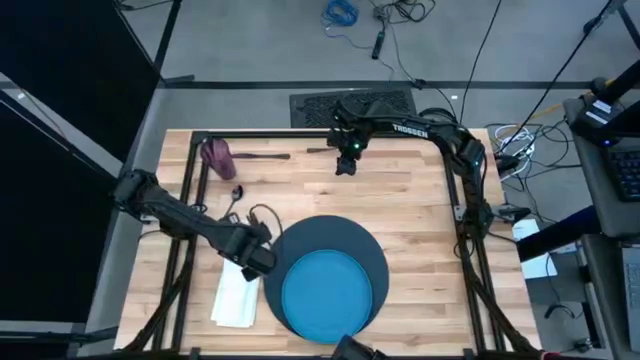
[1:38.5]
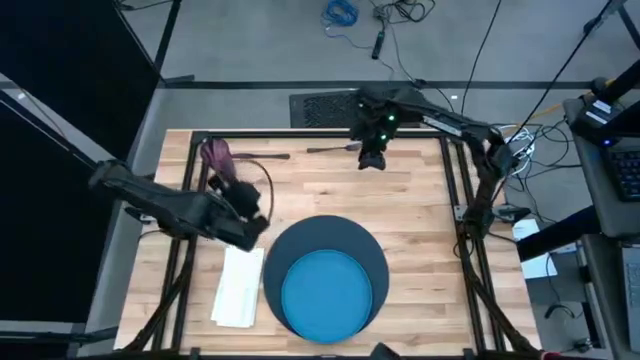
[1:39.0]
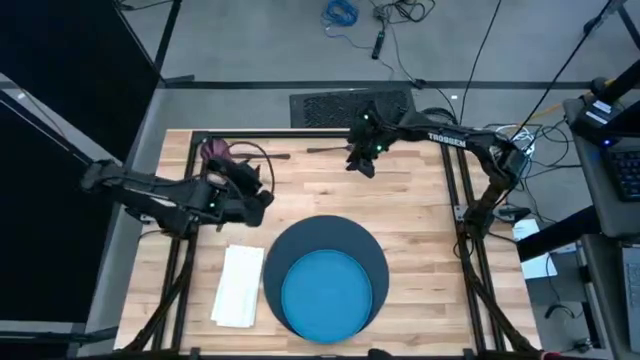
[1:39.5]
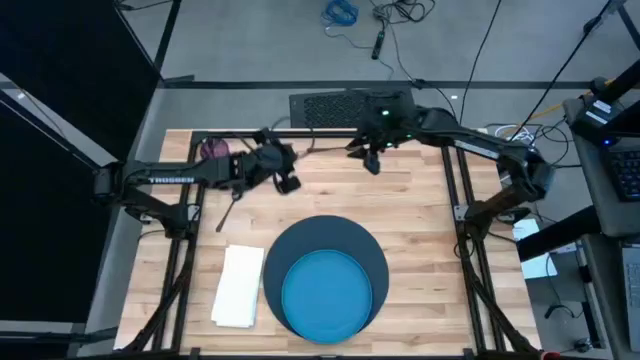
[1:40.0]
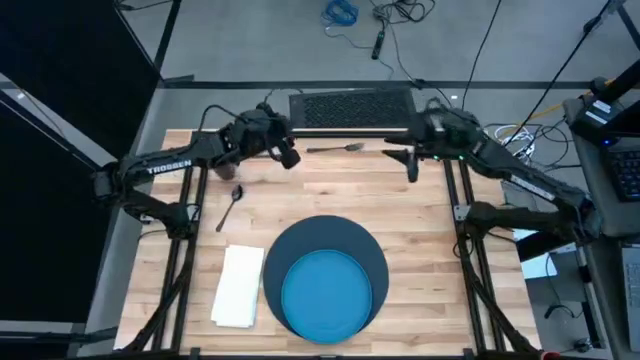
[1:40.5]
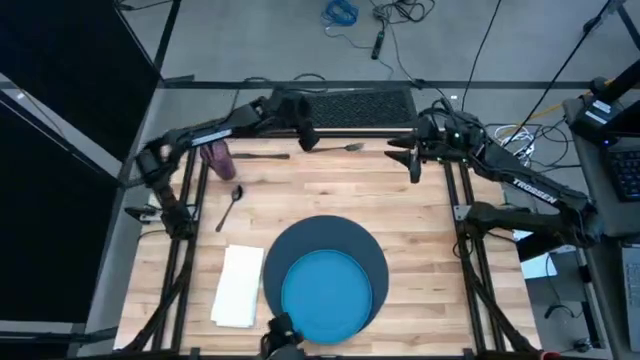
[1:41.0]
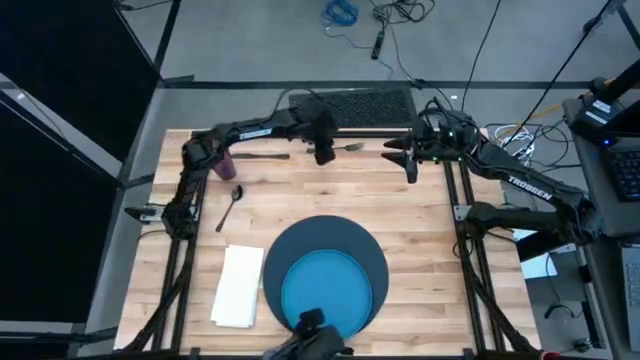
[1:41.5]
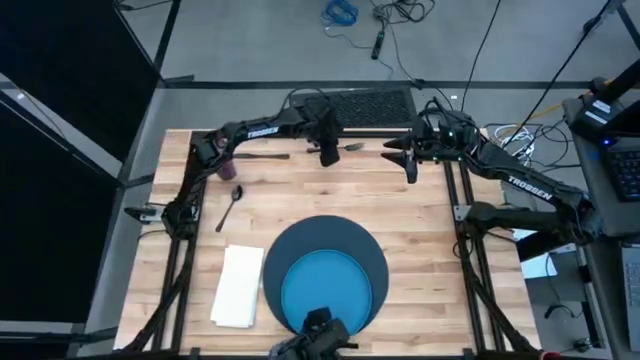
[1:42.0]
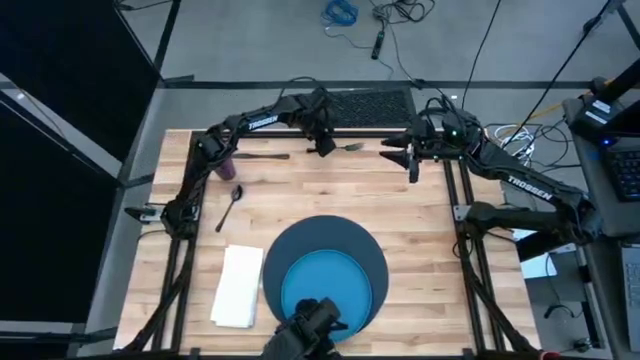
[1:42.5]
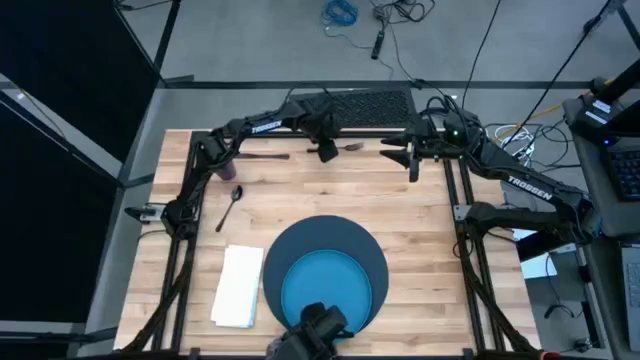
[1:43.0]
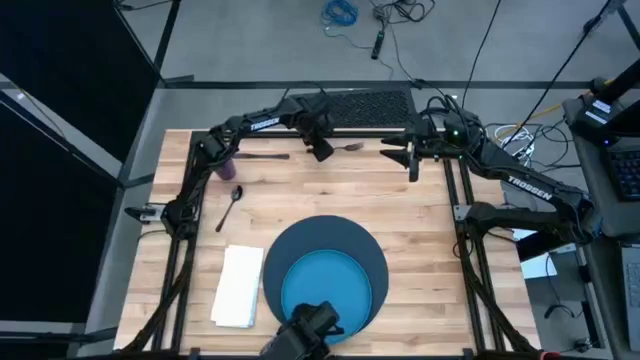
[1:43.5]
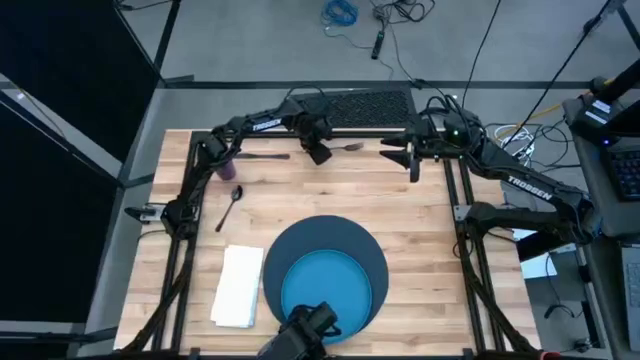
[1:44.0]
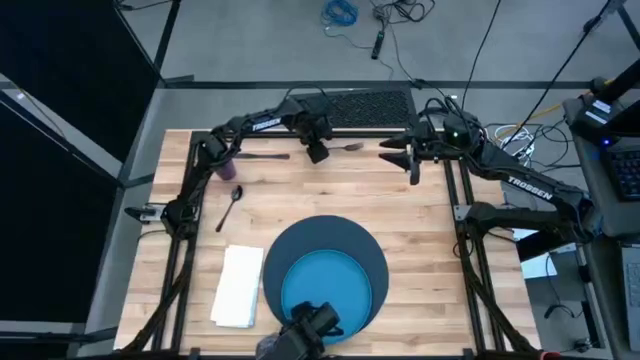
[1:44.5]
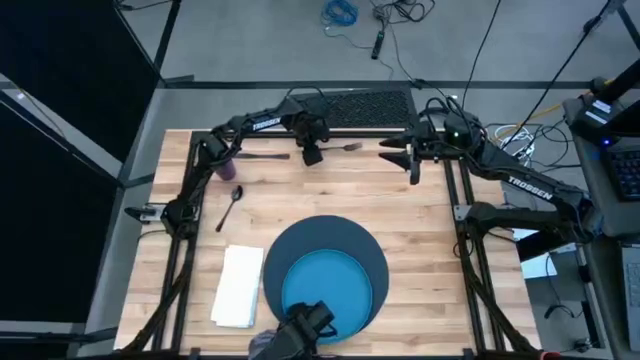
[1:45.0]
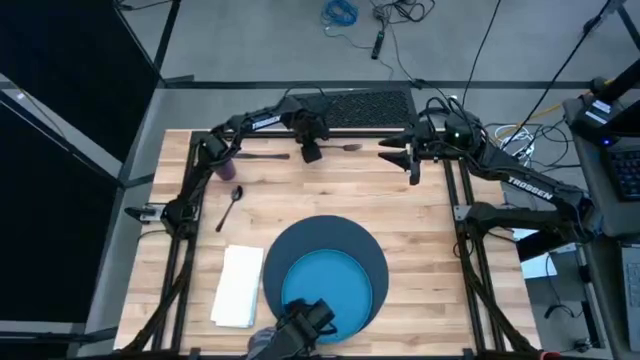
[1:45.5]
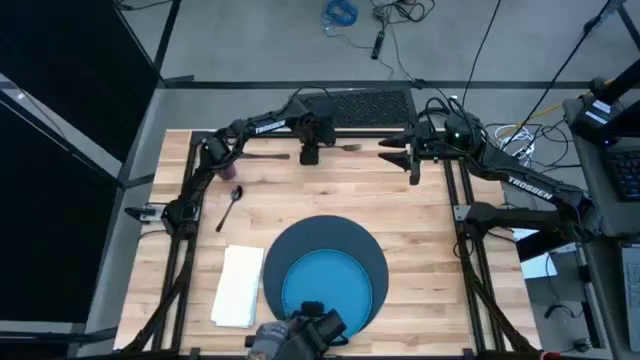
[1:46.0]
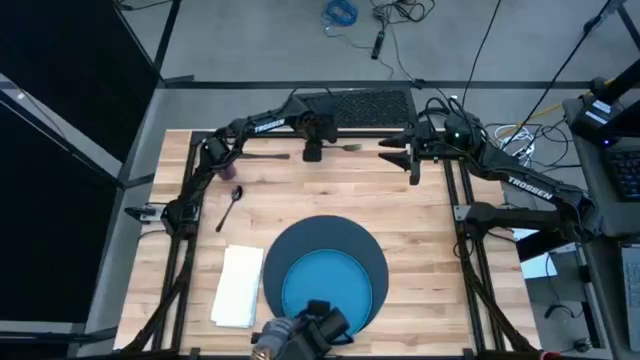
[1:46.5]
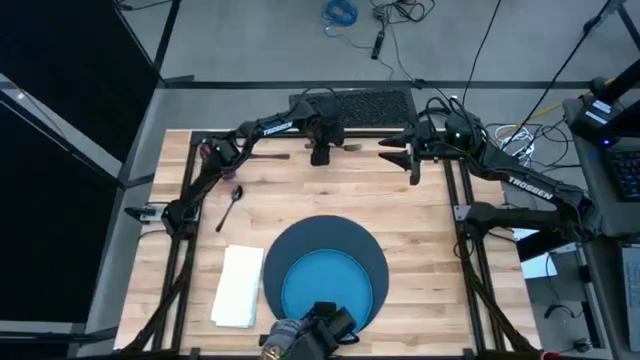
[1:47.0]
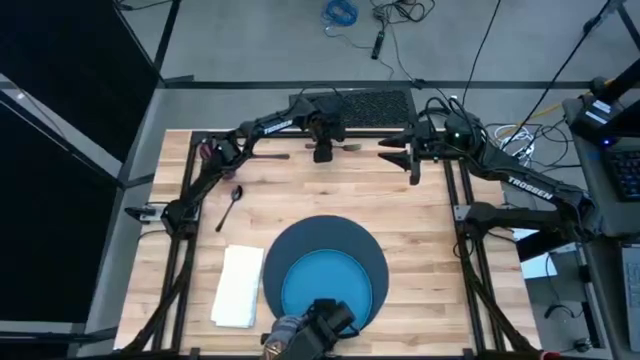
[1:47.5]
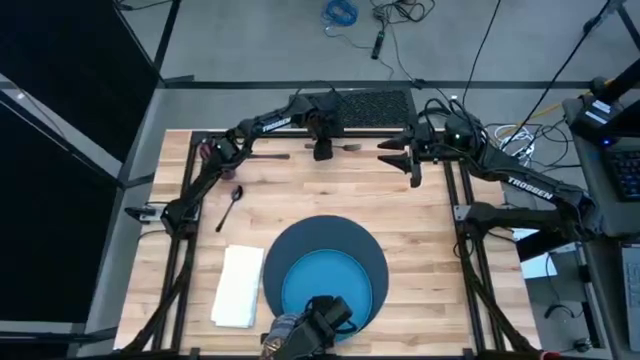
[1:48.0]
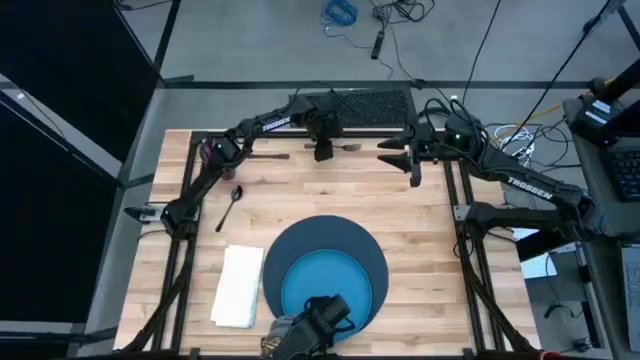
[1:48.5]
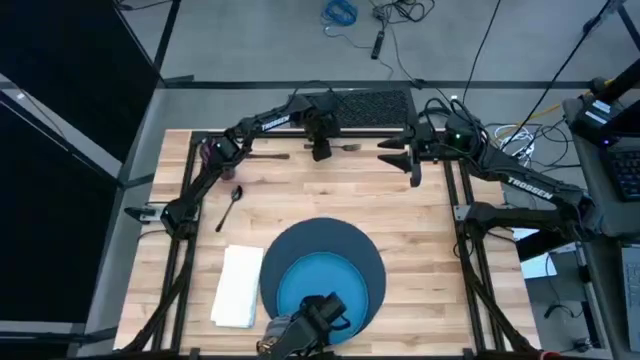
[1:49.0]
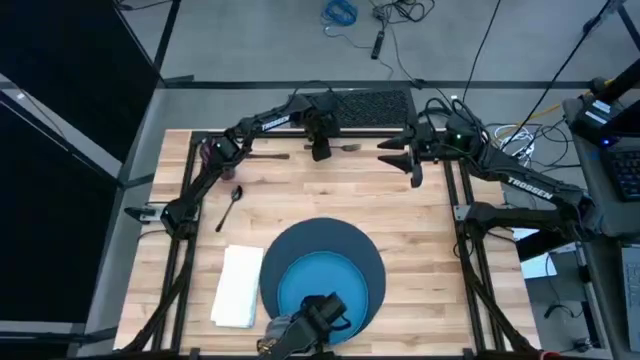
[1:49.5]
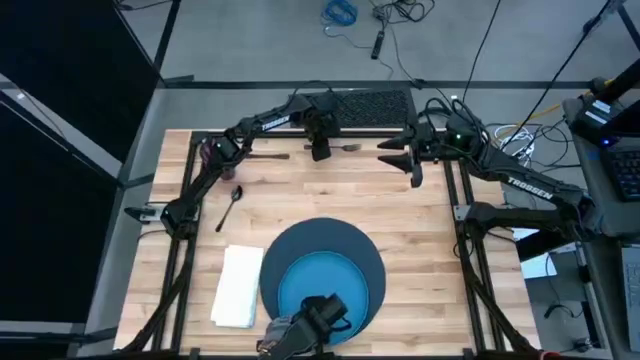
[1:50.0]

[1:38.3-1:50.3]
Task: Set table place
Put the fork on the white table napkin

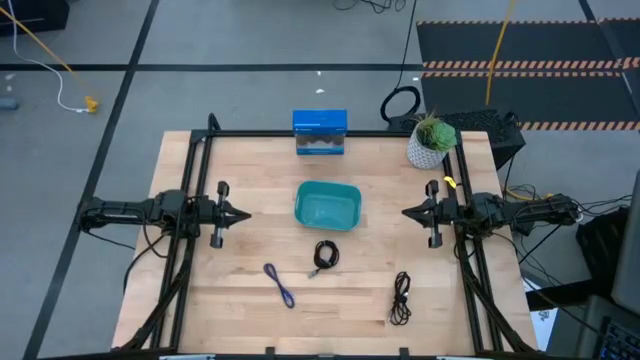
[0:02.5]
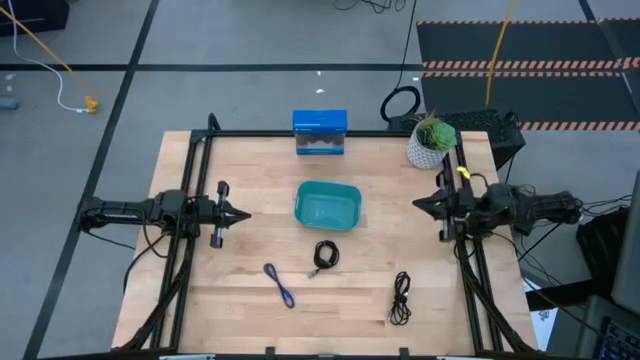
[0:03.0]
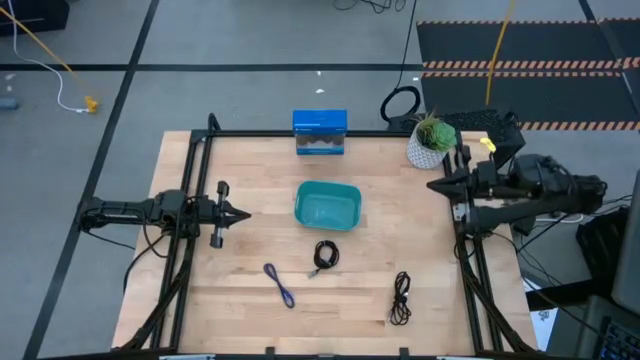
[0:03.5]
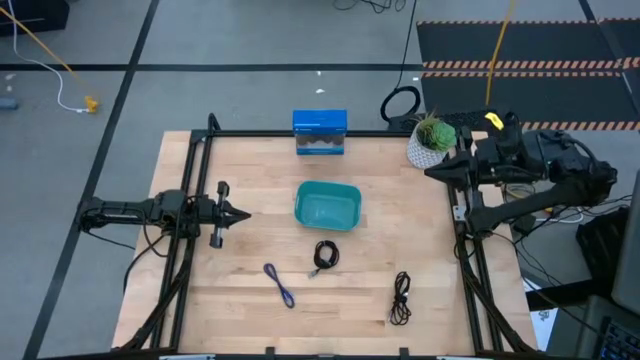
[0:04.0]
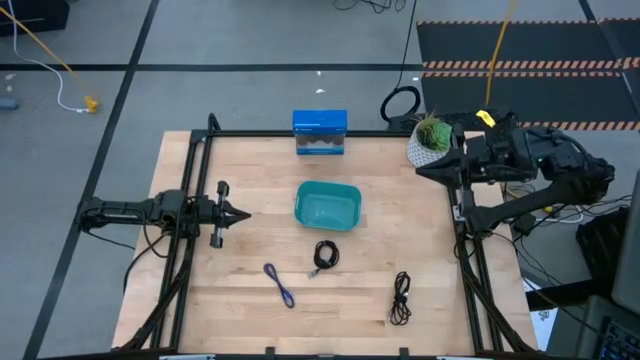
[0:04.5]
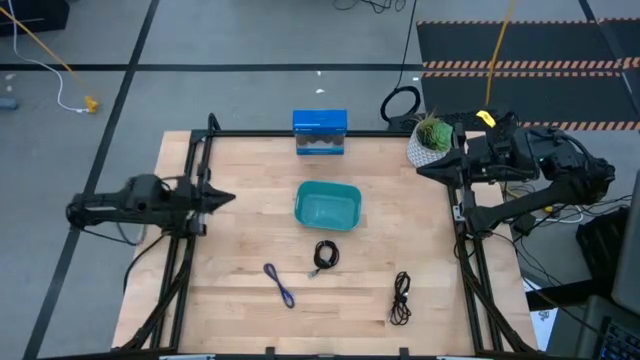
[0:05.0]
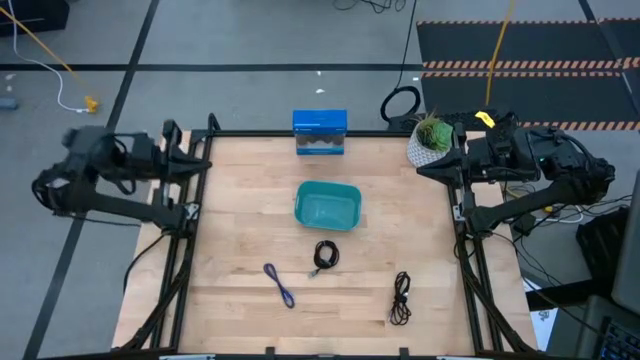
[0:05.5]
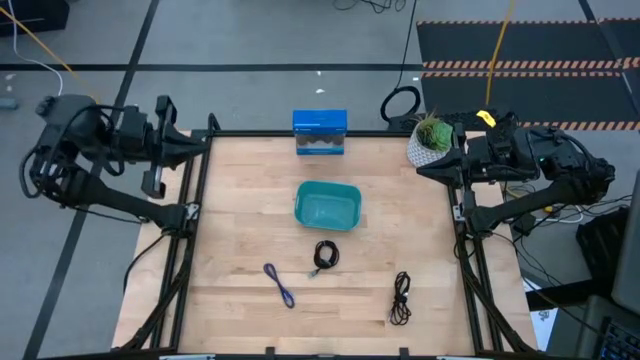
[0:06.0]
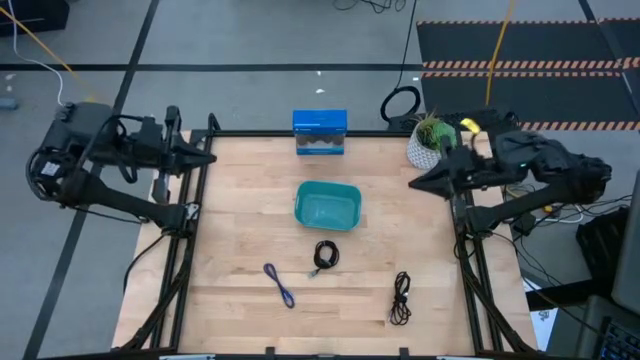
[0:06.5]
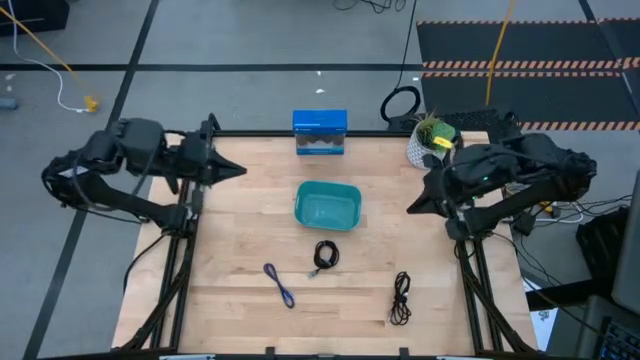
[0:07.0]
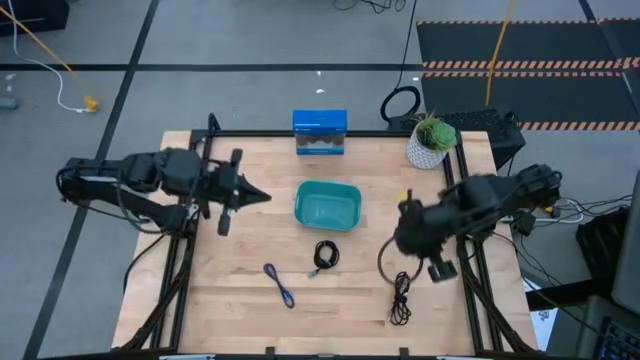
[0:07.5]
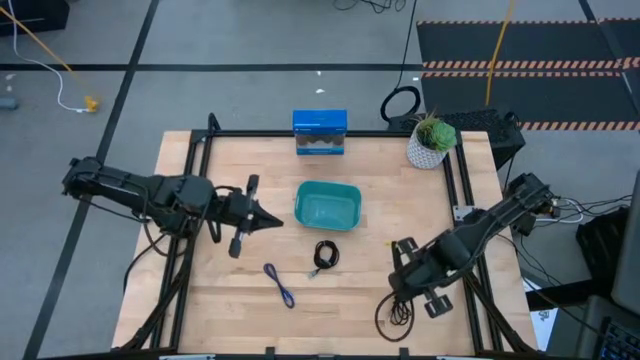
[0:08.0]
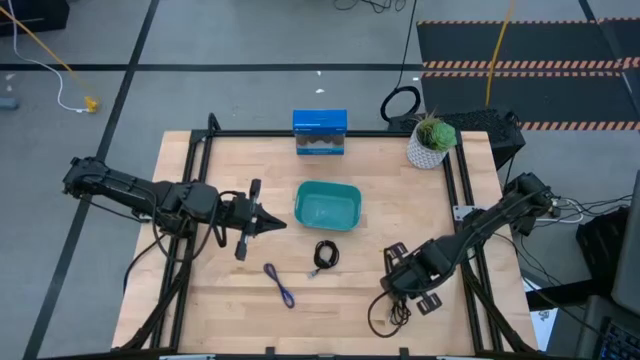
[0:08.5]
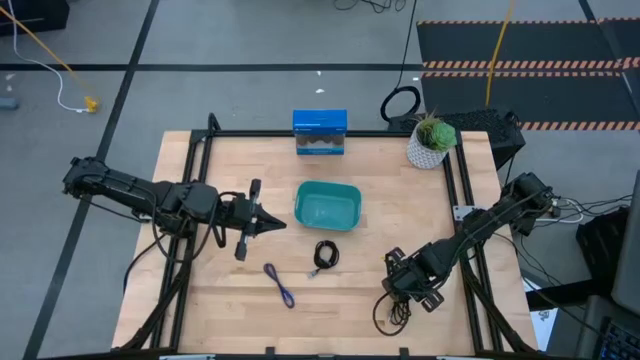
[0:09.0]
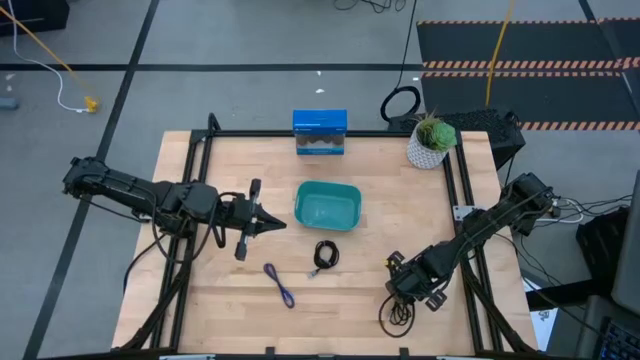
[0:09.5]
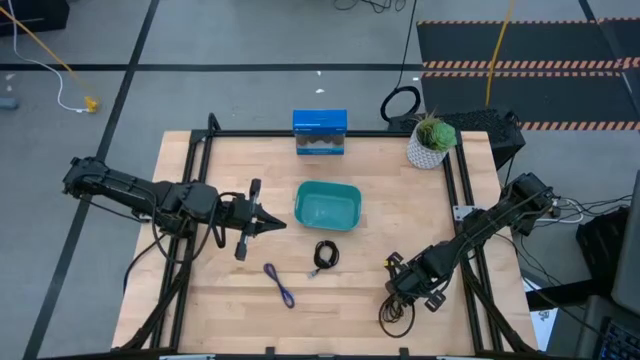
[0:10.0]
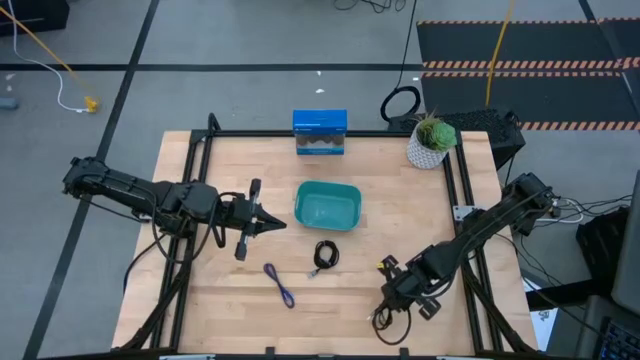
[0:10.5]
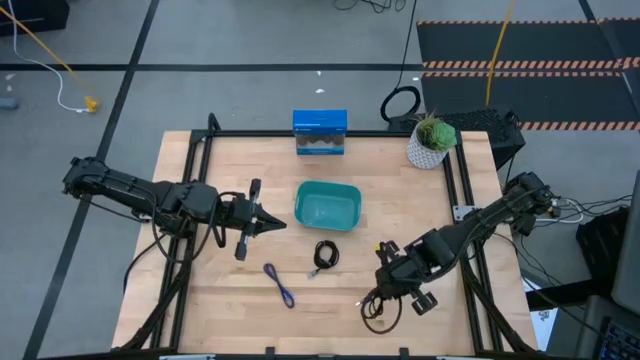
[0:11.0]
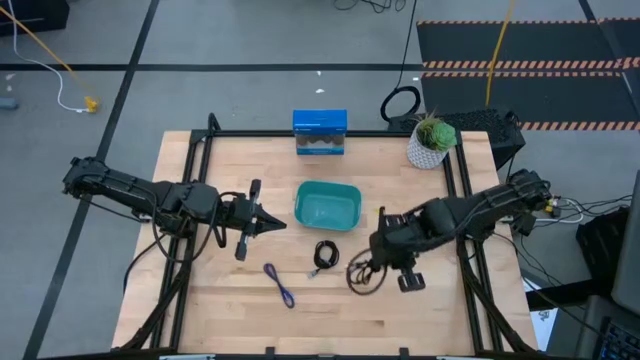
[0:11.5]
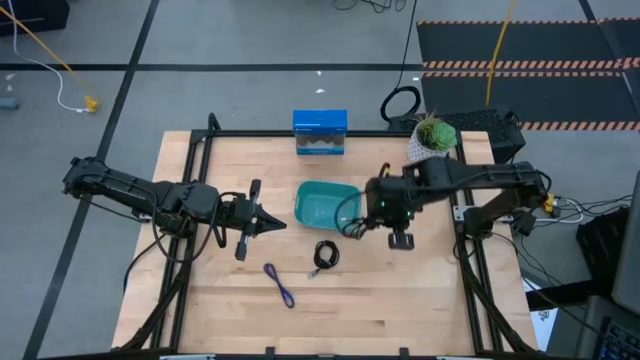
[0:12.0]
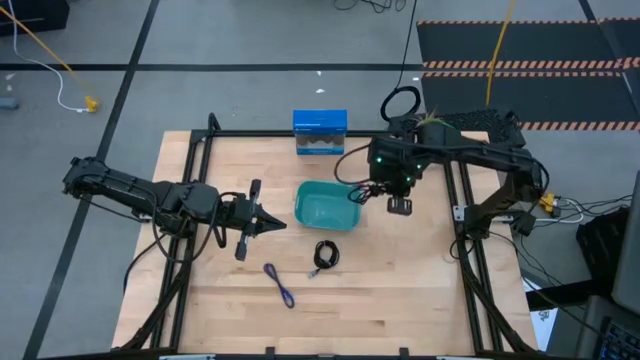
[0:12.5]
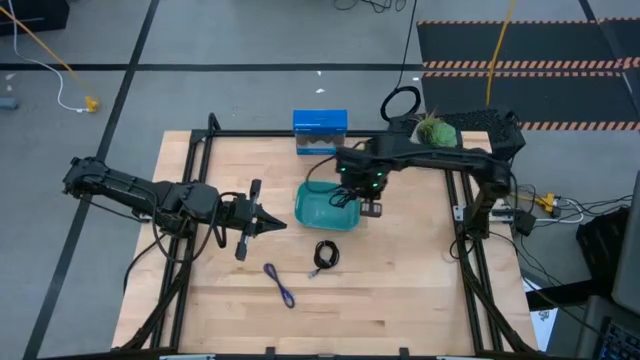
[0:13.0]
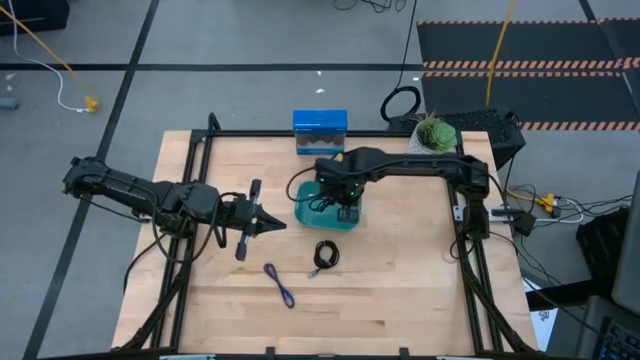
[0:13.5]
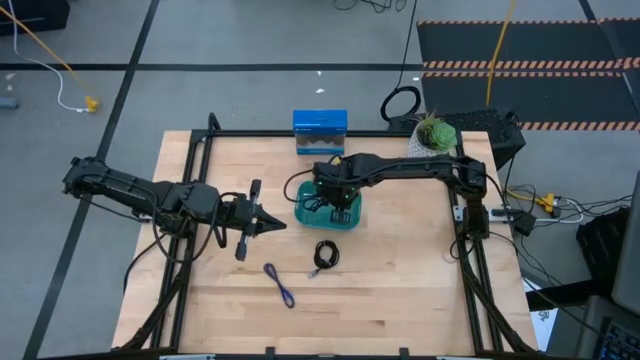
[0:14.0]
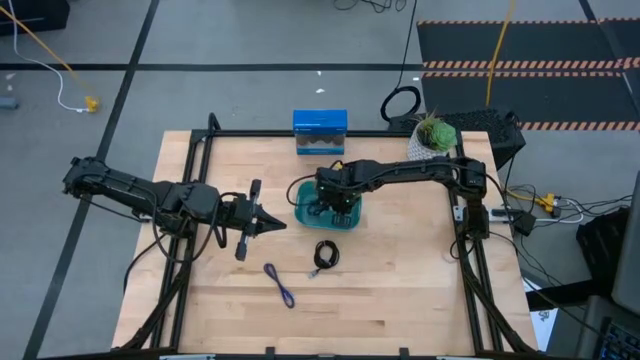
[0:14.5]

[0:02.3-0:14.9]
Task: Pick and place USB-C Cables
Put the bottom black charger cable into the green container
